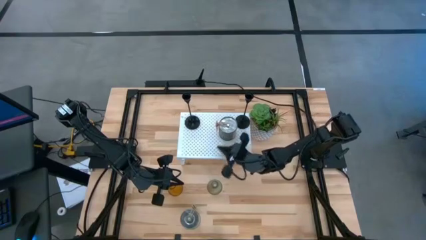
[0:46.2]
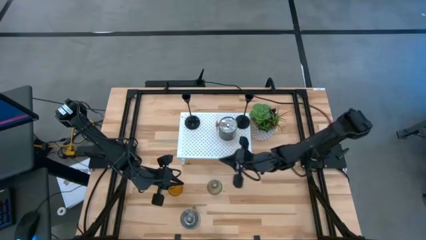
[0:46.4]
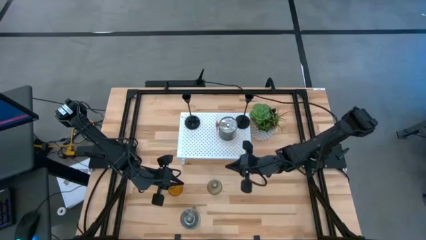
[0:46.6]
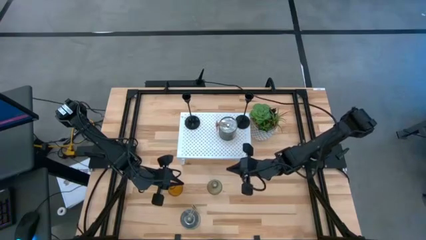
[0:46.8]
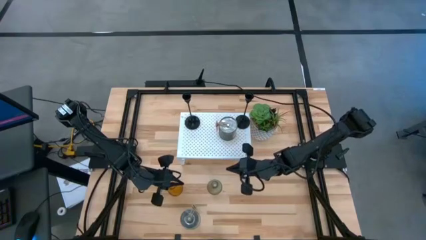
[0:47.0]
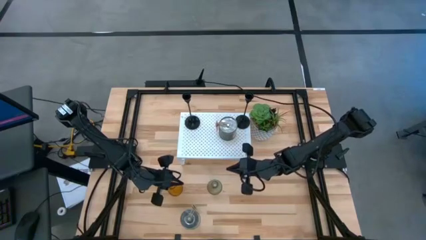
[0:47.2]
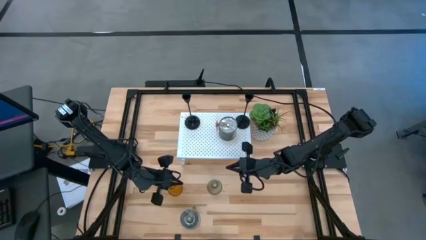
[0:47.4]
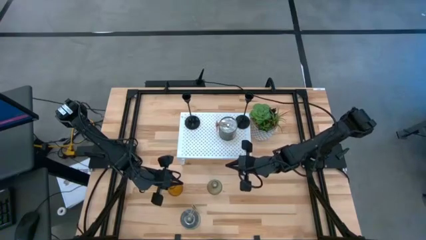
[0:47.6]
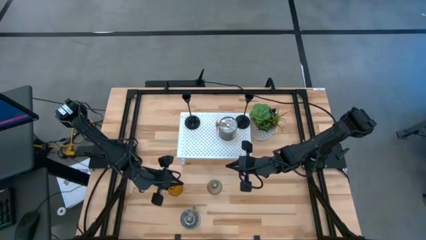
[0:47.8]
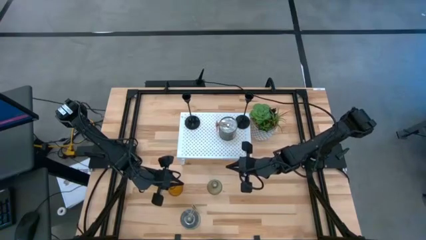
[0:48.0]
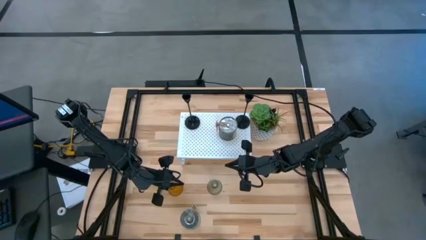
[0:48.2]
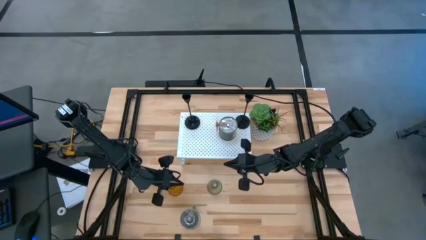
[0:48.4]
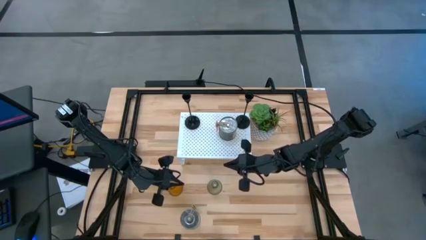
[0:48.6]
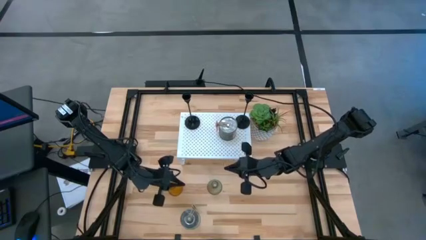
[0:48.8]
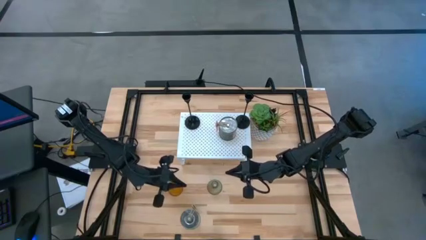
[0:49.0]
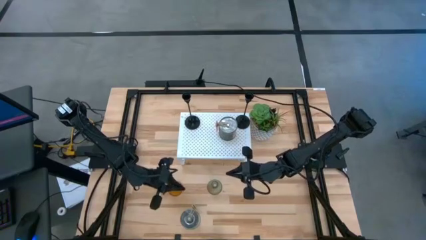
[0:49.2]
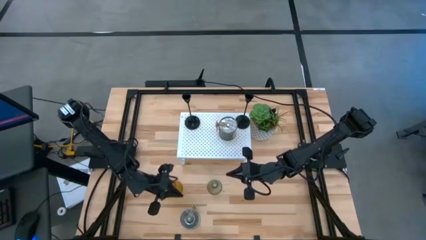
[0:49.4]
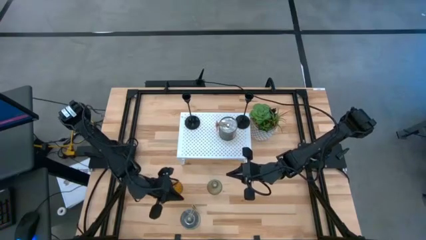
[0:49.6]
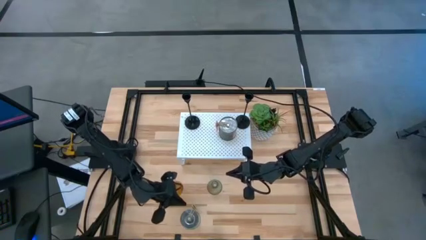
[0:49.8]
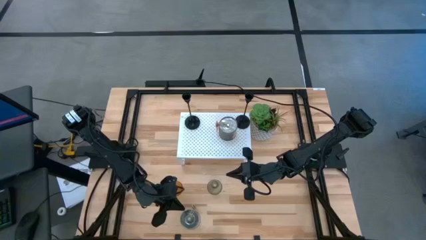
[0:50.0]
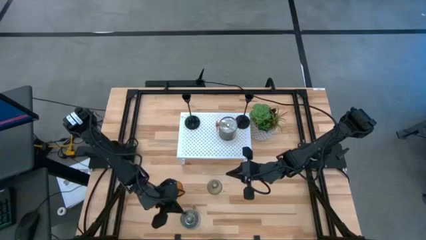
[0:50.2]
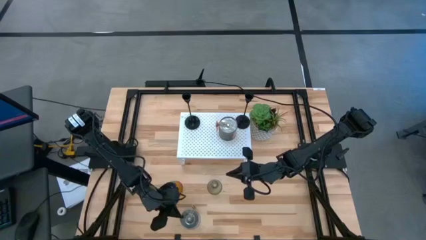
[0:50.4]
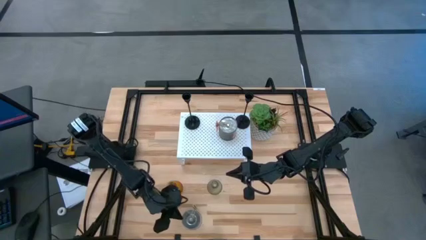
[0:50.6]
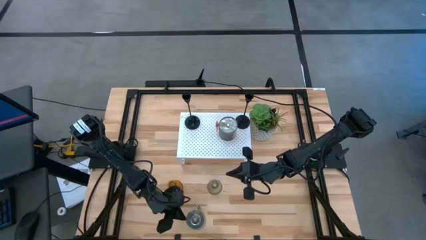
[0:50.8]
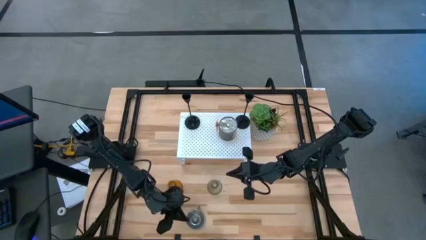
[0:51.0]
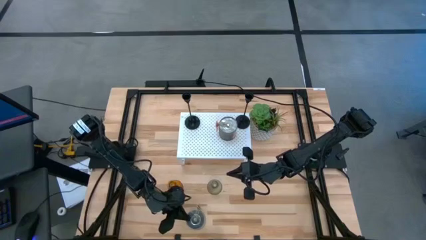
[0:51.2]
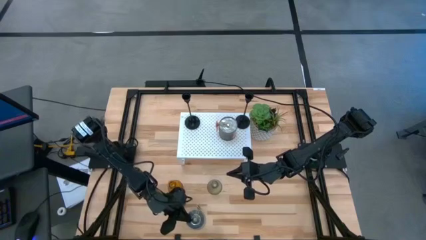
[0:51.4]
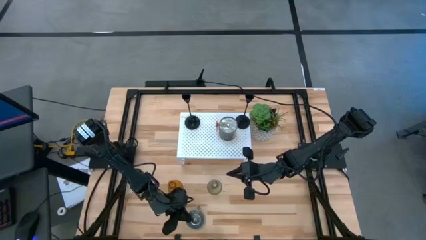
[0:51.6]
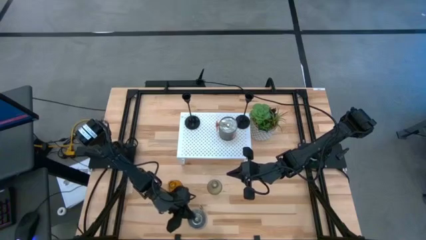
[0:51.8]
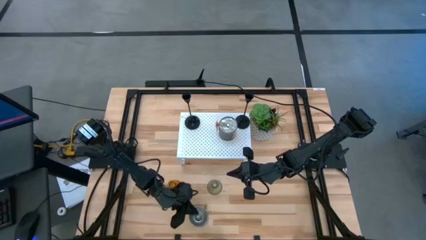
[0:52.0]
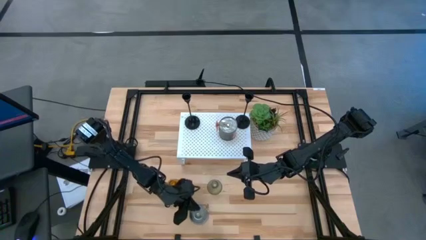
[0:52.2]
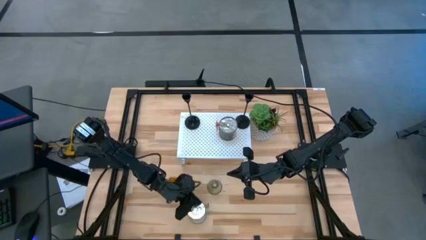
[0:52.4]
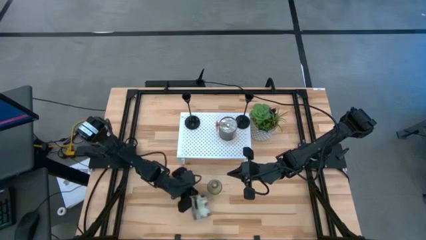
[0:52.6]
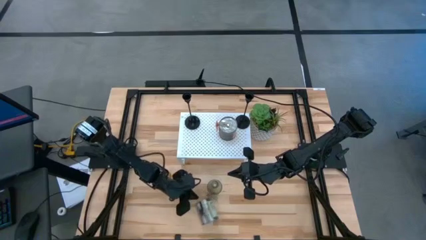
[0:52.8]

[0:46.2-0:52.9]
Task: Pick & Place candle stick holders
Put the scented candle on the shelf

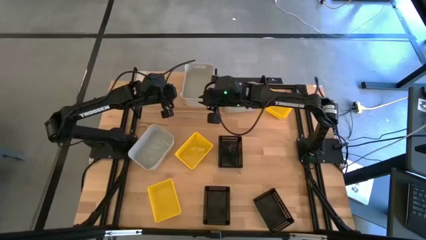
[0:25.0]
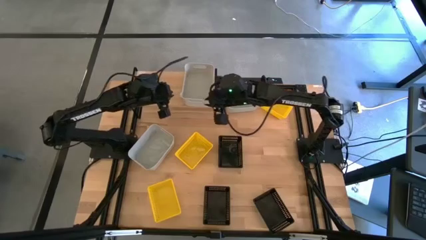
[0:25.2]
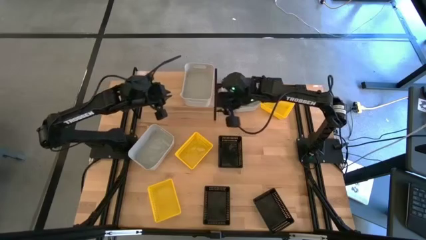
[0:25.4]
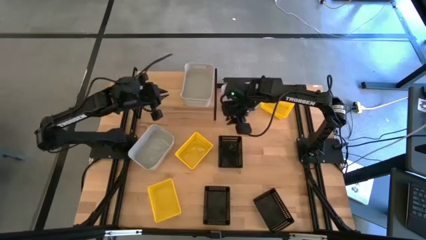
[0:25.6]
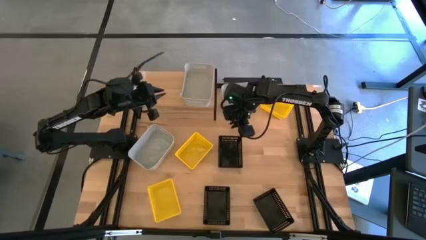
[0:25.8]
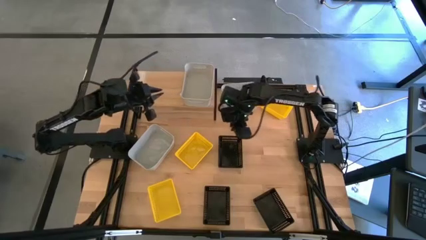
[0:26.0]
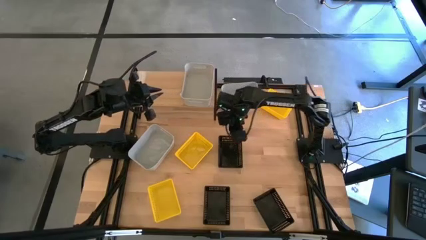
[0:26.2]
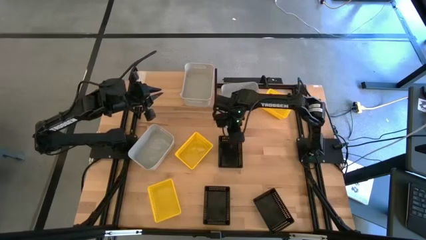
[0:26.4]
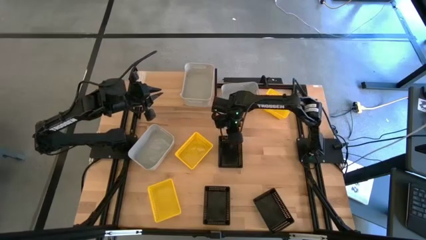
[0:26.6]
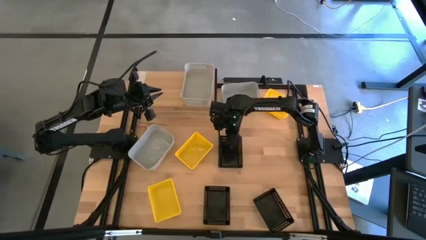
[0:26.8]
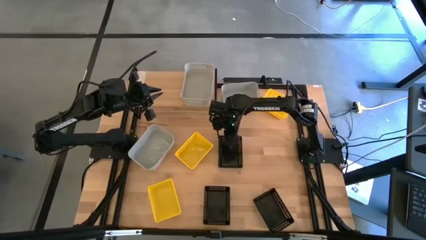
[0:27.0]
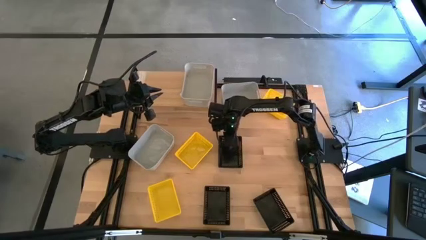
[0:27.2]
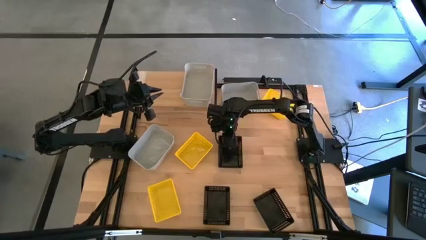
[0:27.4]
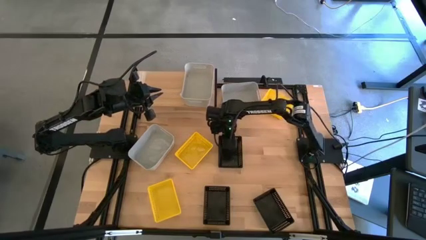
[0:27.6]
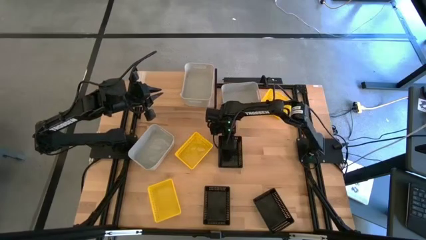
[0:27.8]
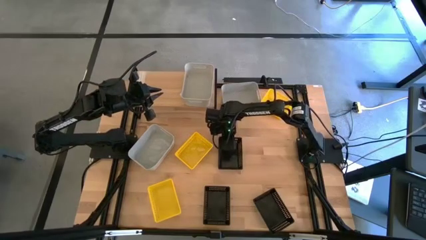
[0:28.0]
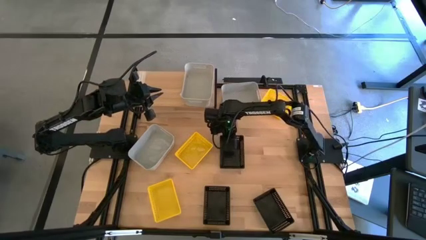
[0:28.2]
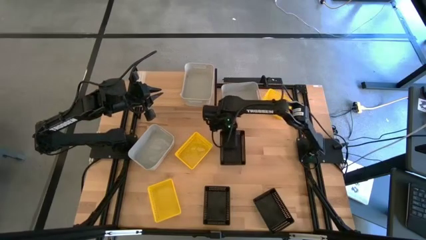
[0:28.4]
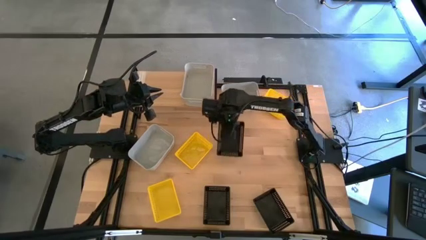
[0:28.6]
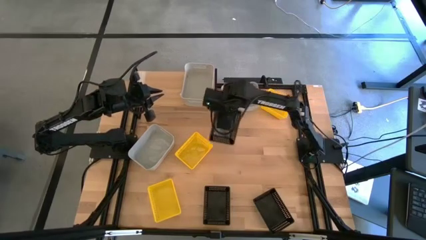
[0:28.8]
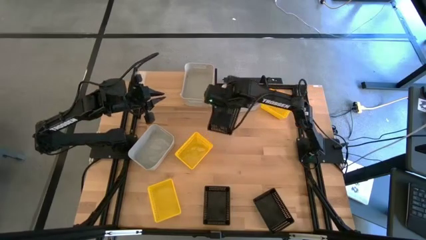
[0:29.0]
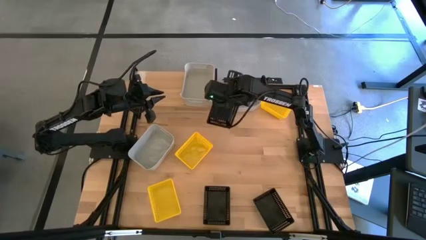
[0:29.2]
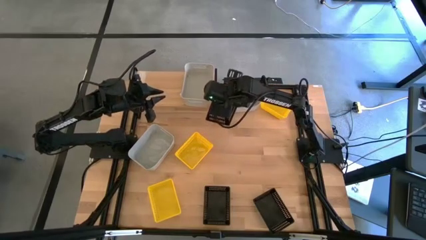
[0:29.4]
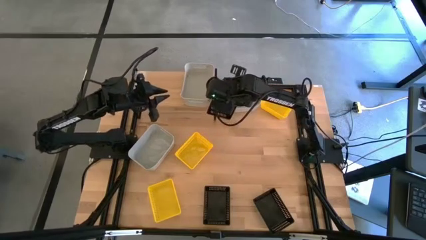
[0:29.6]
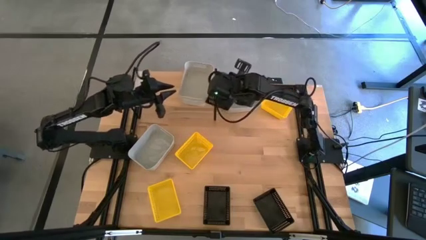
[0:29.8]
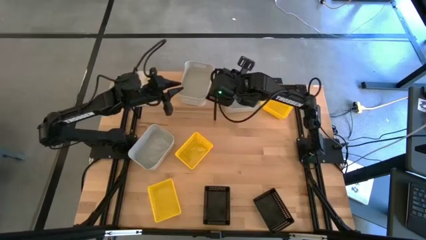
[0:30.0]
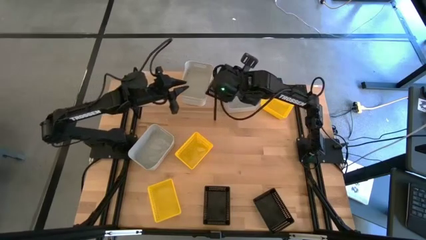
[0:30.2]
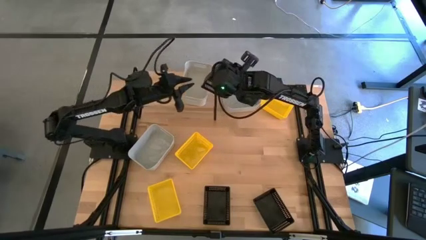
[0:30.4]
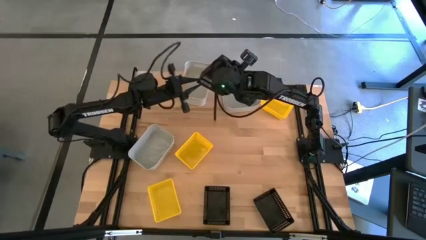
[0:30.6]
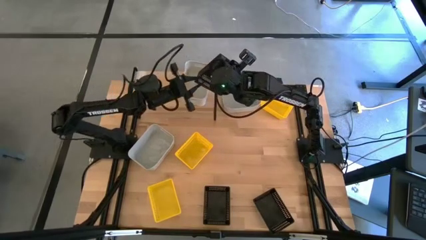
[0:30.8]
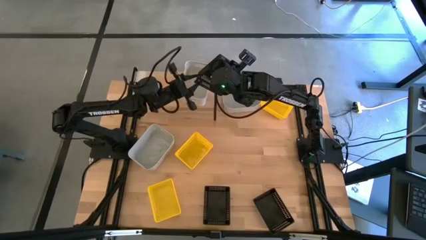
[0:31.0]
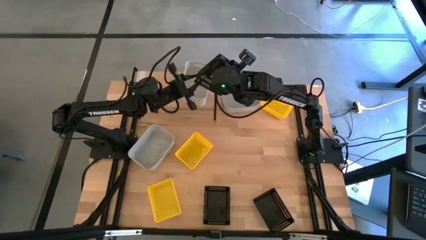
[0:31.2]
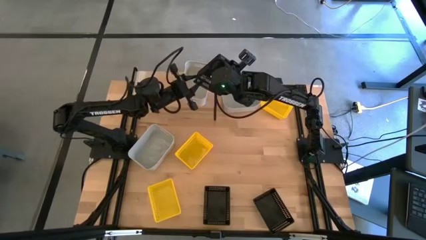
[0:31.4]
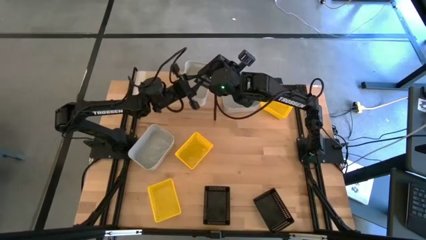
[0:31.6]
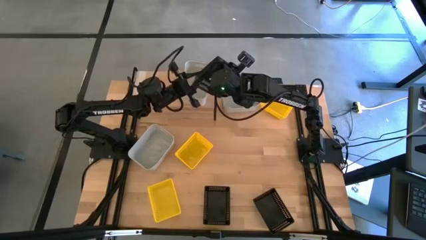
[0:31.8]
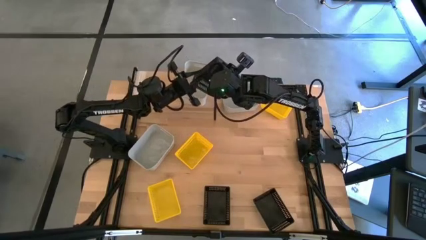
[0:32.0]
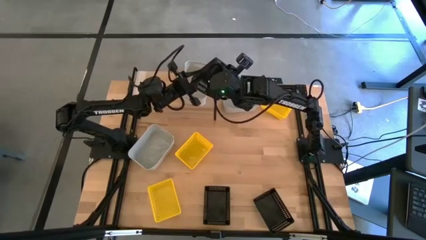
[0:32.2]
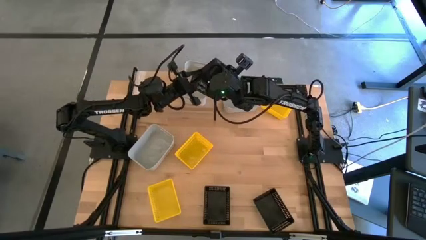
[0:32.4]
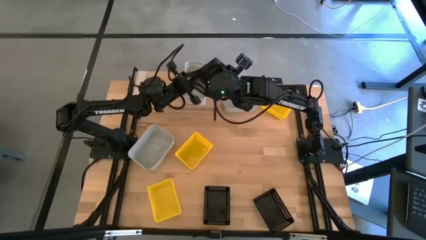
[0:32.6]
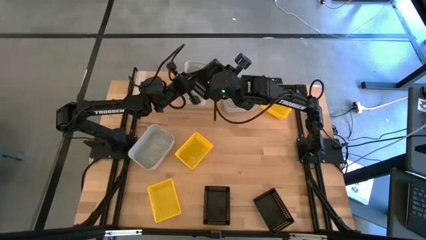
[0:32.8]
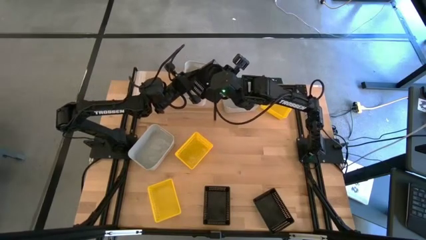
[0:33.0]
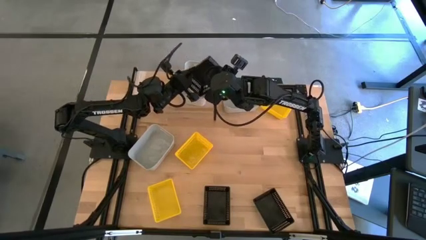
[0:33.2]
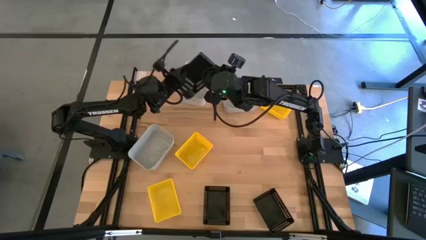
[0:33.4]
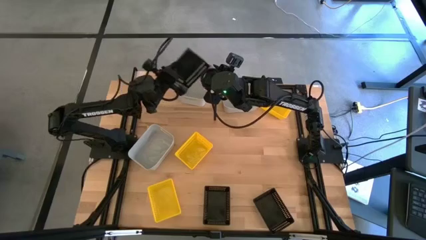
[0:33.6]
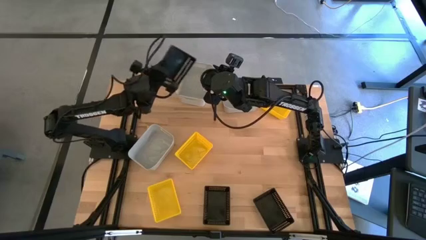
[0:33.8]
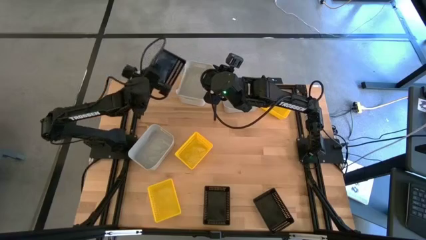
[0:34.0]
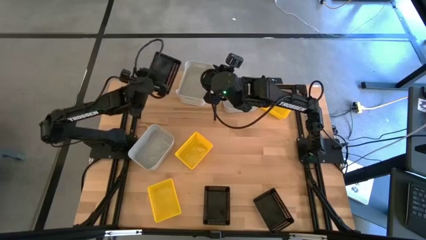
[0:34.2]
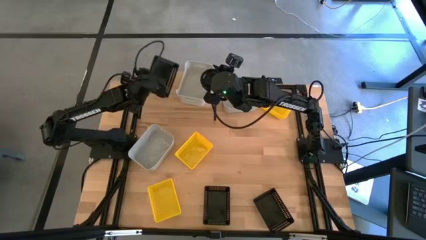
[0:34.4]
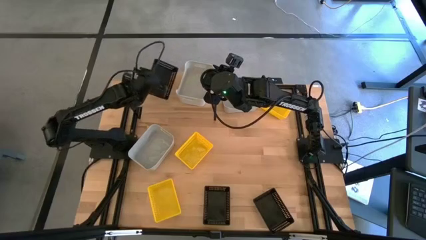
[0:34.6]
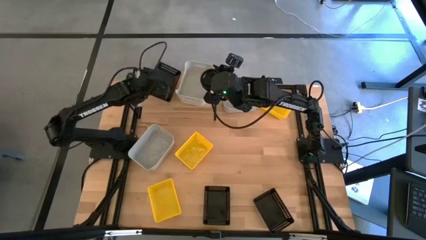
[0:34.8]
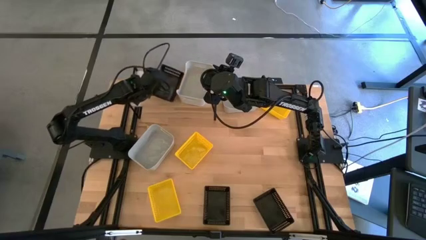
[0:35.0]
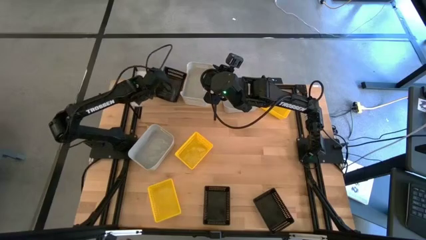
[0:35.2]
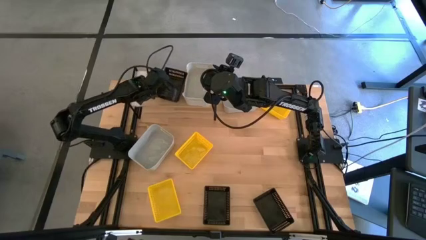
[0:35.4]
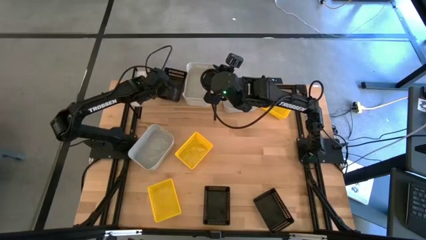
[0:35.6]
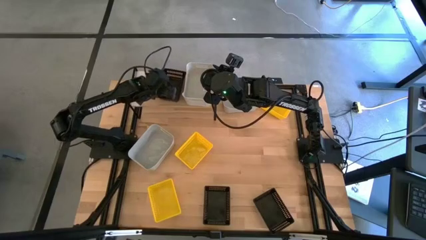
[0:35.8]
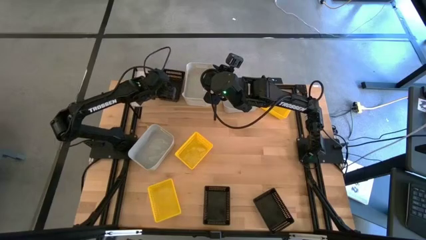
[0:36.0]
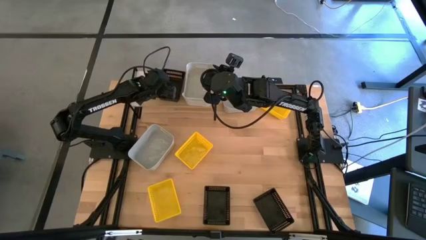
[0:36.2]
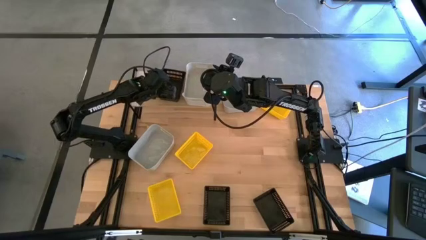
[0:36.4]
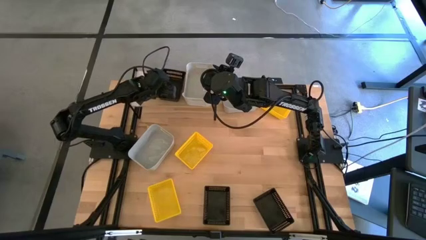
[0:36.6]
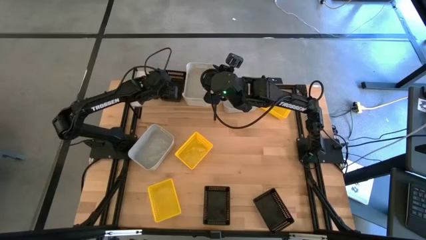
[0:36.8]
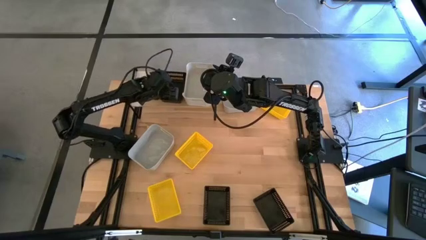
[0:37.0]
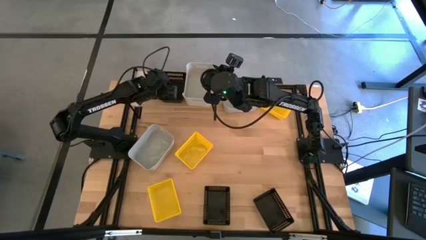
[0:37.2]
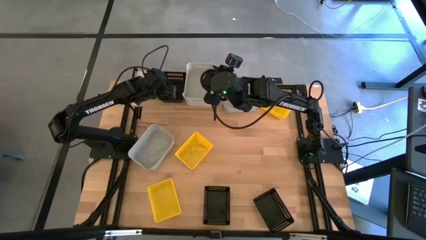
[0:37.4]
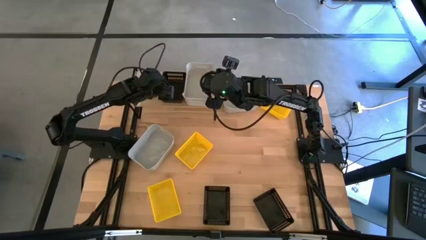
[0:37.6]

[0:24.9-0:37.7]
Task: Stack baskets on shelf by color
Put the top black bin on the shelf
